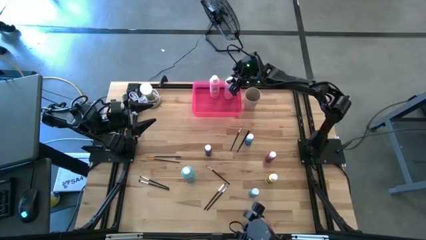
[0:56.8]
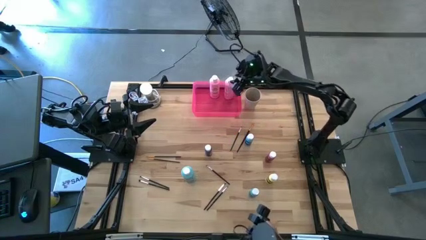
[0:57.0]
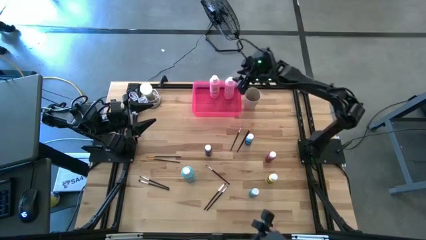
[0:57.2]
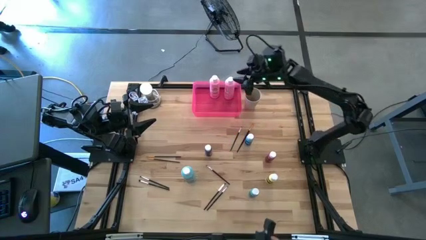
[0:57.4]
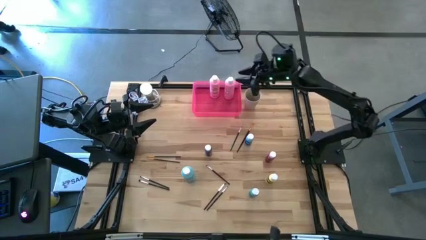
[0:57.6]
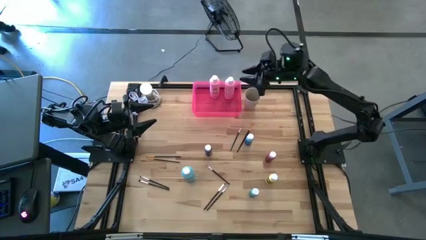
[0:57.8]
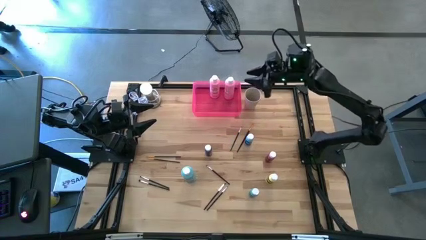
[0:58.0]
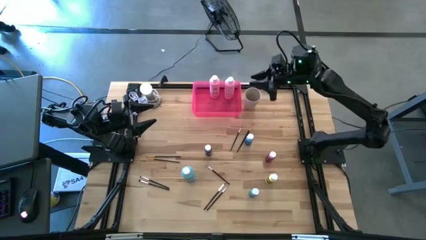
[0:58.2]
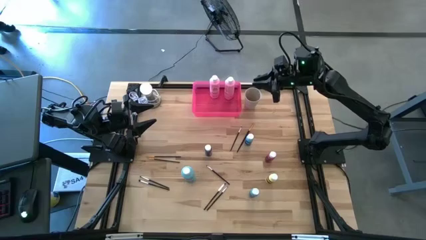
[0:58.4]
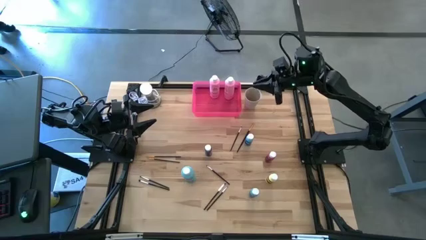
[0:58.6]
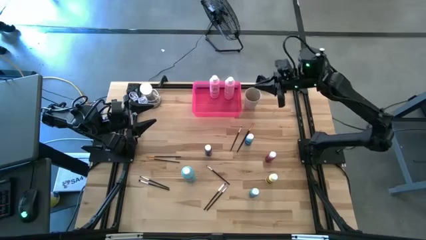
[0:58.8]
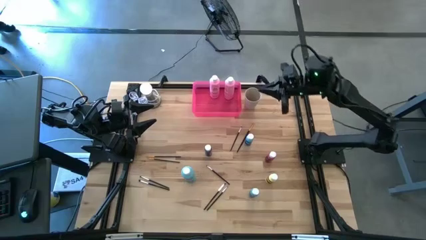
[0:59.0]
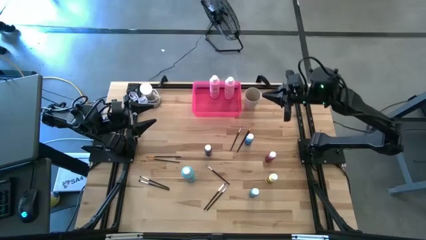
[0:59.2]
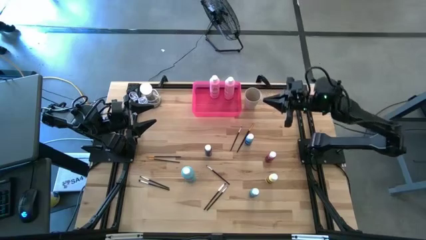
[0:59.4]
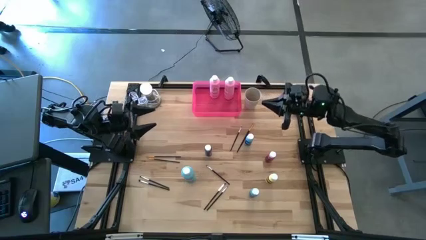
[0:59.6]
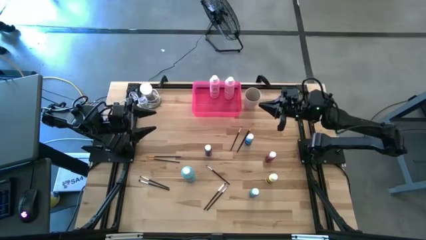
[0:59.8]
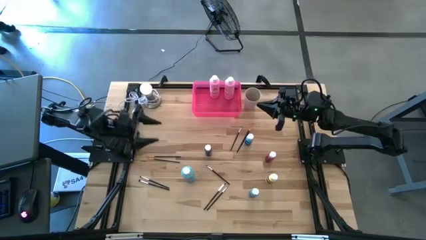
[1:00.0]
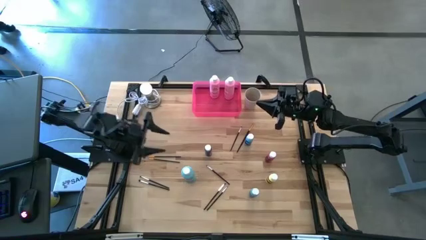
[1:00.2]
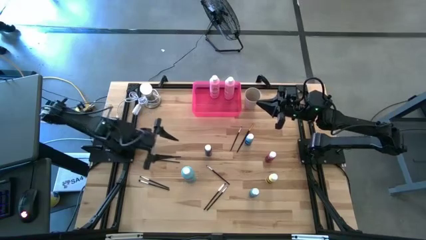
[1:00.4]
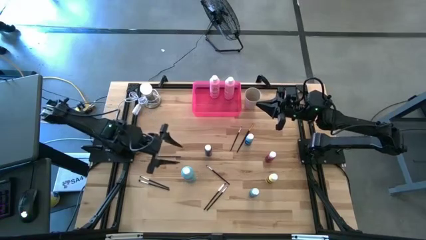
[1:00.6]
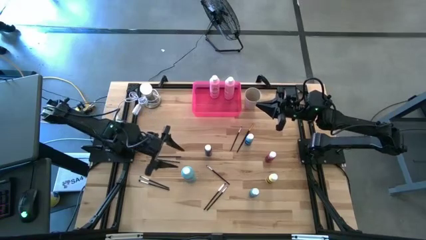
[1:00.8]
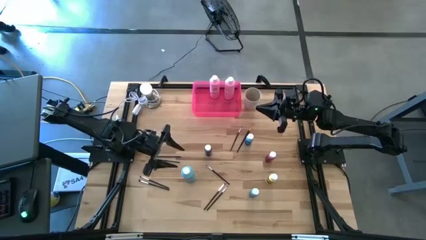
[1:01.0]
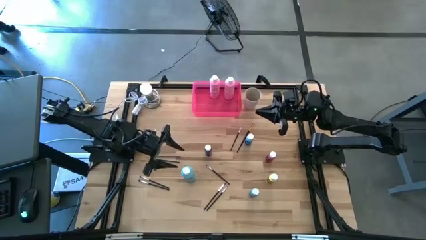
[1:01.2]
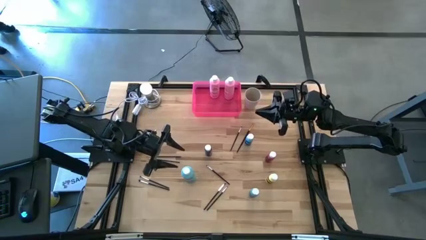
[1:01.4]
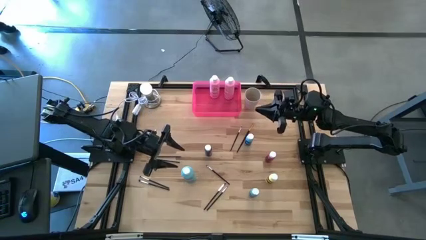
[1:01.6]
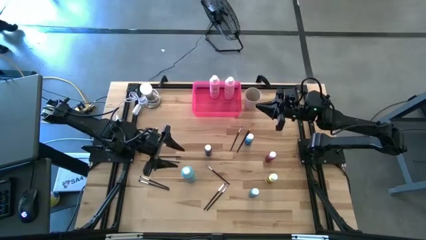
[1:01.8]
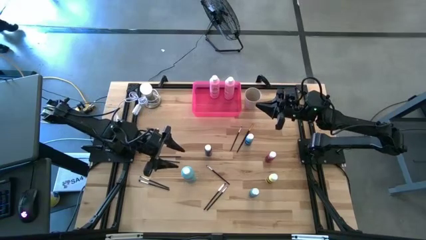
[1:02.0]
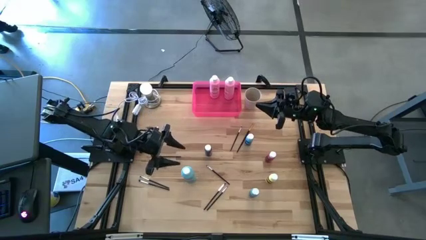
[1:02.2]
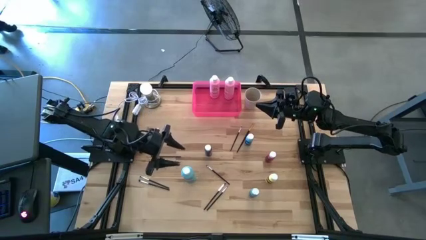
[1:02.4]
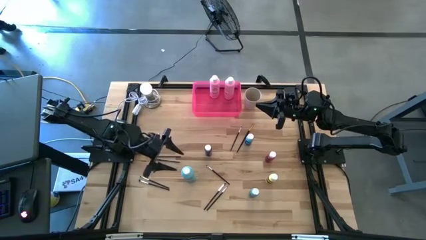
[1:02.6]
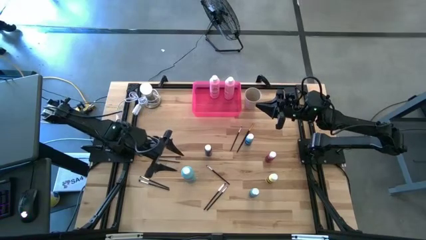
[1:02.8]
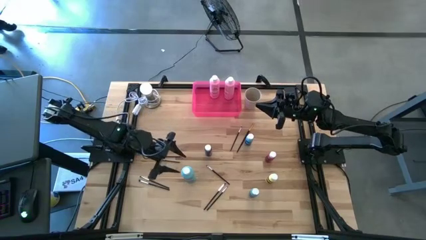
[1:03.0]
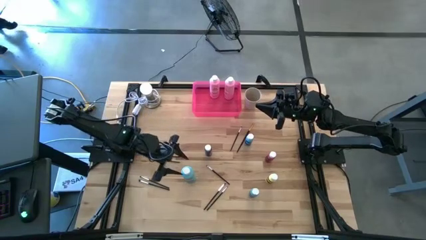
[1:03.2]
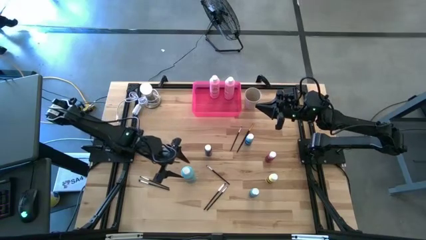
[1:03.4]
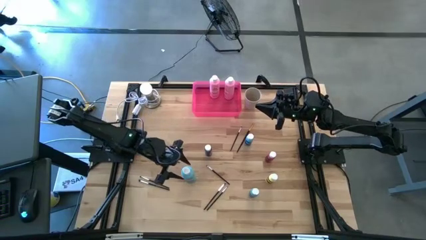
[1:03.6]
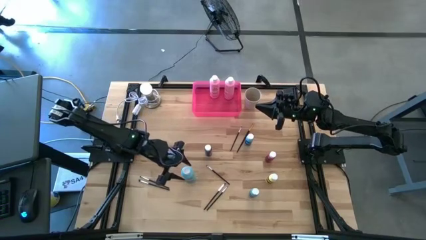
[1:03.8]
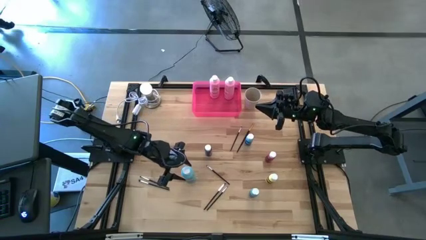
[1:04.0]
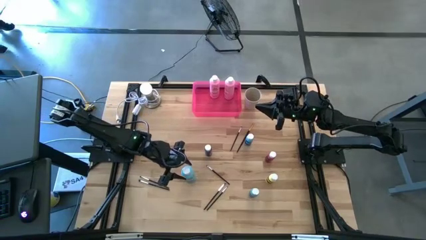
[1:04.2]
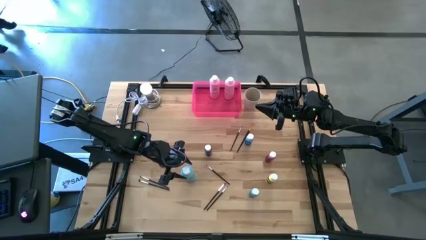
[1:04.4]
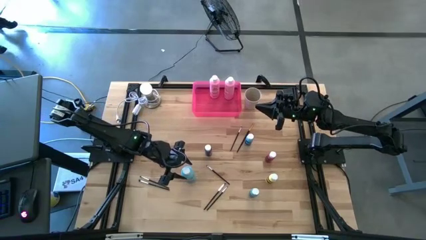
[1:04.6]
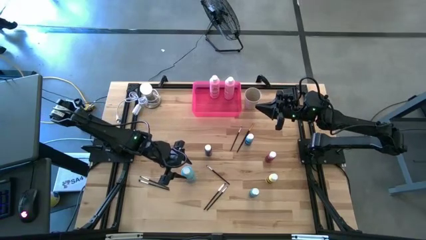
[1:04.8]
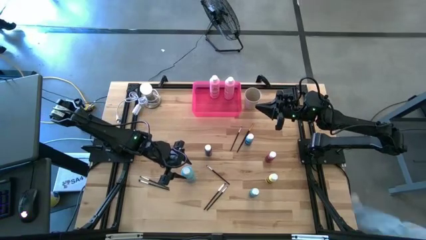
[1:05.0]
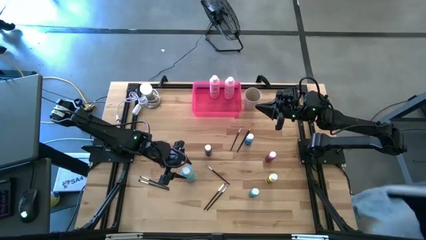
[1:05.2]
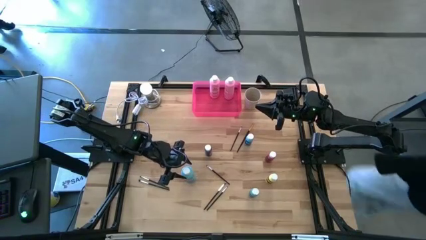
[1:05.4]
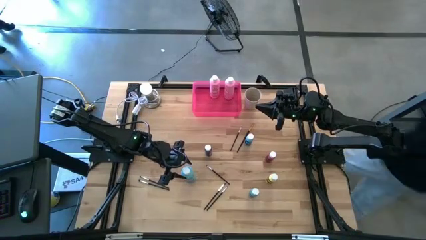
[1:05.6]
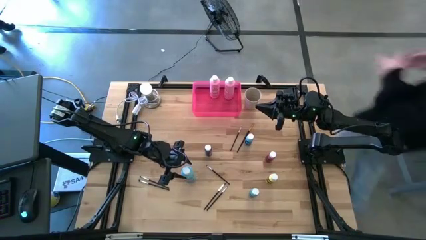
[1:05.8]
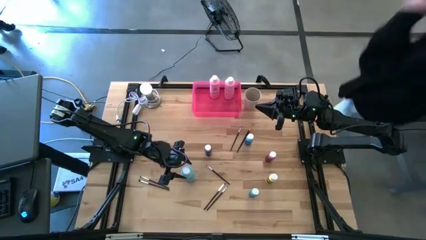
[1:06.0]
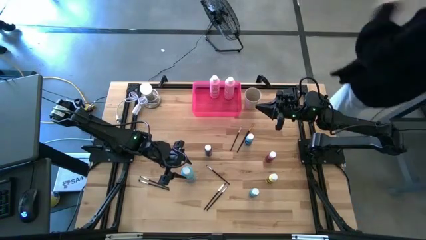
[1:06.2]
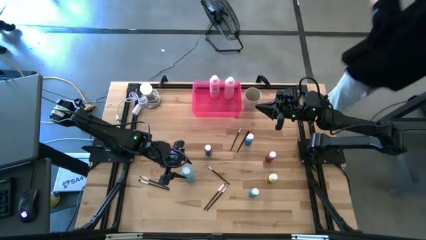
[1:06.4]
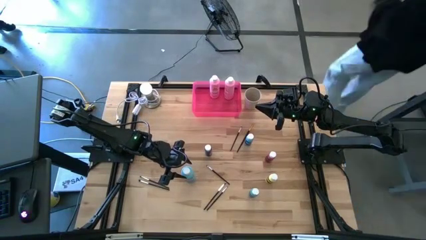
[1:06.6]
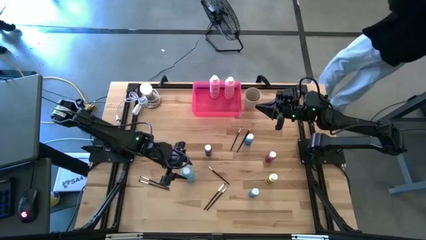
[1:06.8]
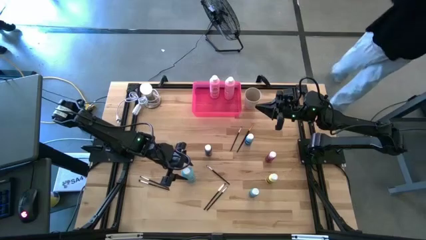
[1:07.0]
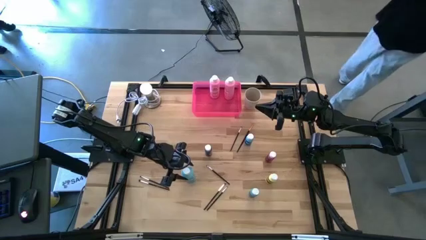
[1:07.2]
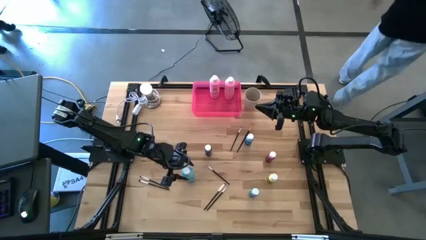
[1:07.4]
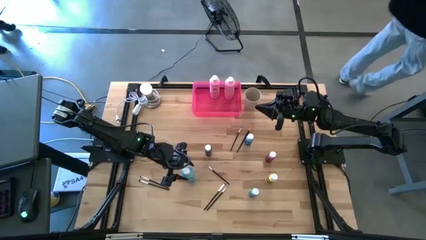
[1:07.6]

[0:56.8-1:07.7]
Task: Pick & Place Paint Supplies
Put the big blue paint bottle into the pink bin
